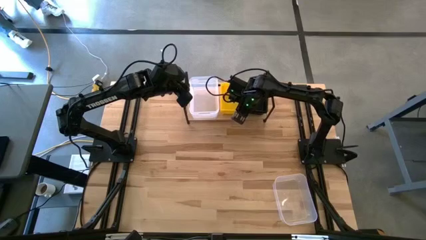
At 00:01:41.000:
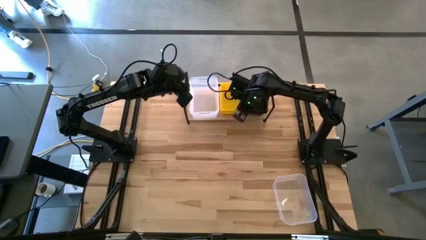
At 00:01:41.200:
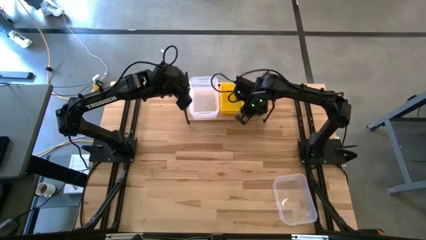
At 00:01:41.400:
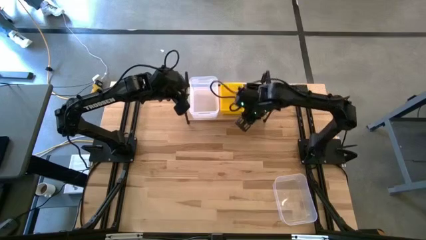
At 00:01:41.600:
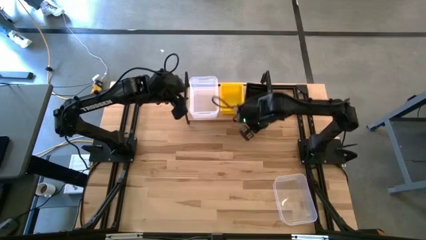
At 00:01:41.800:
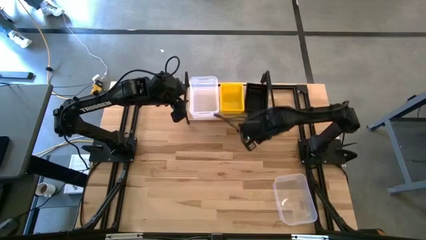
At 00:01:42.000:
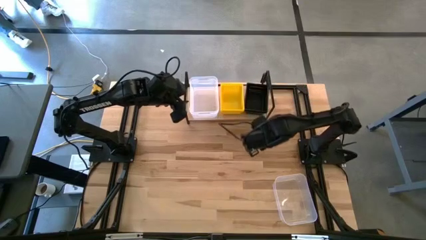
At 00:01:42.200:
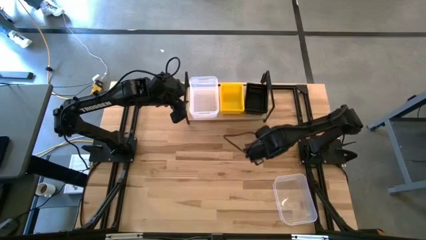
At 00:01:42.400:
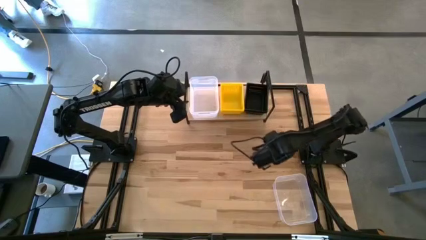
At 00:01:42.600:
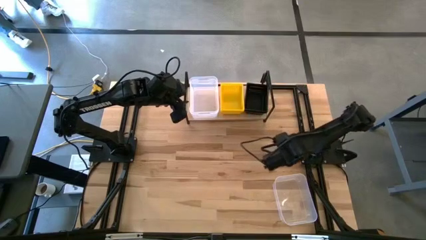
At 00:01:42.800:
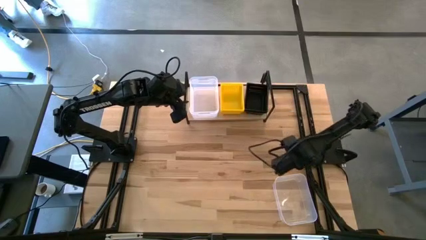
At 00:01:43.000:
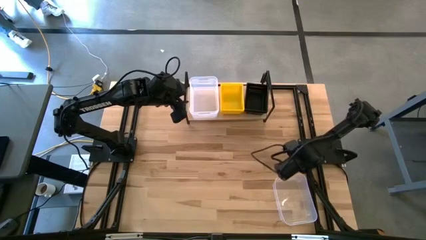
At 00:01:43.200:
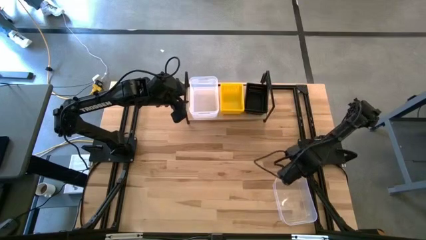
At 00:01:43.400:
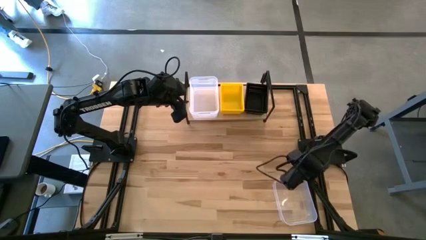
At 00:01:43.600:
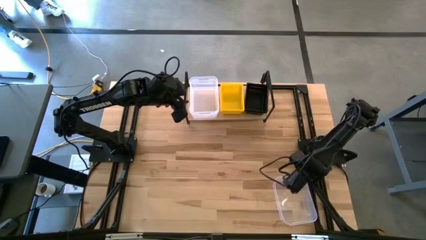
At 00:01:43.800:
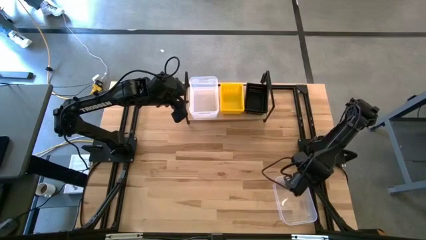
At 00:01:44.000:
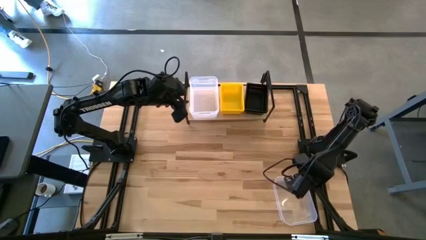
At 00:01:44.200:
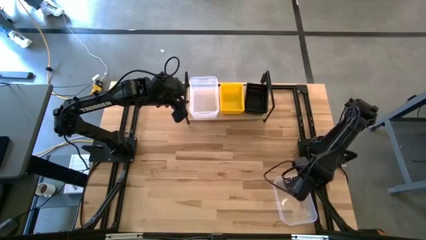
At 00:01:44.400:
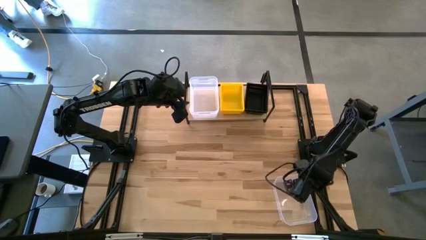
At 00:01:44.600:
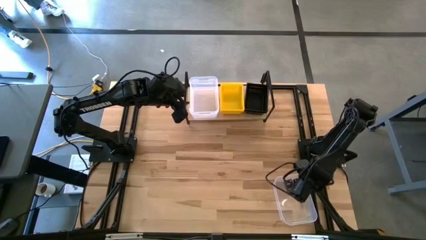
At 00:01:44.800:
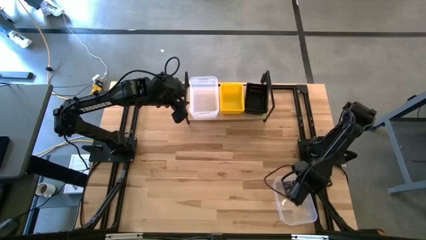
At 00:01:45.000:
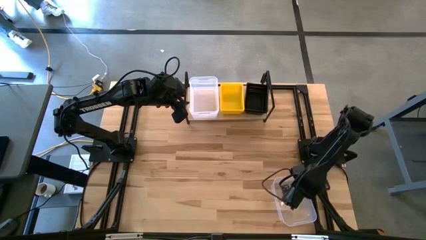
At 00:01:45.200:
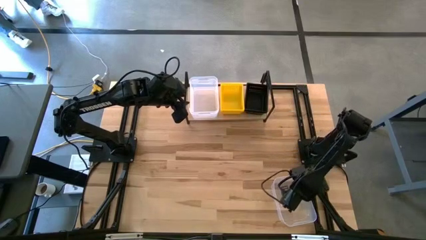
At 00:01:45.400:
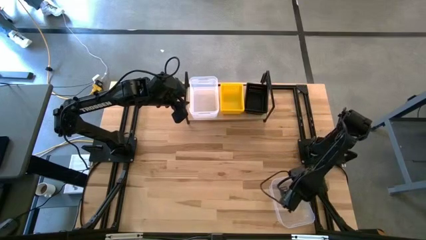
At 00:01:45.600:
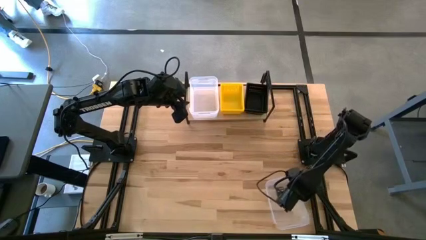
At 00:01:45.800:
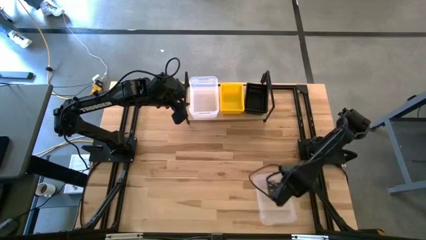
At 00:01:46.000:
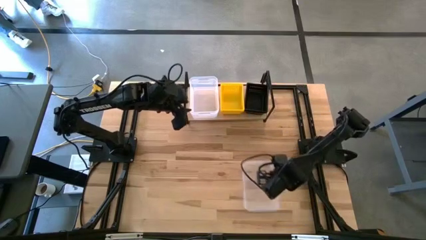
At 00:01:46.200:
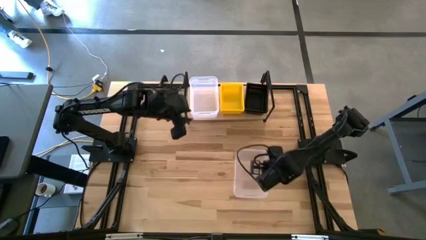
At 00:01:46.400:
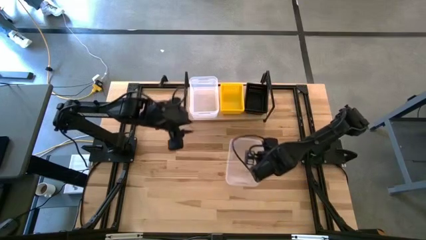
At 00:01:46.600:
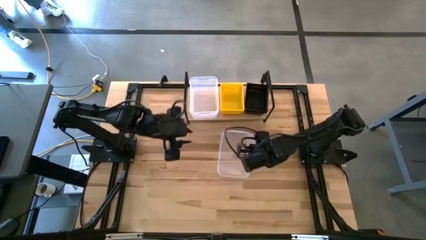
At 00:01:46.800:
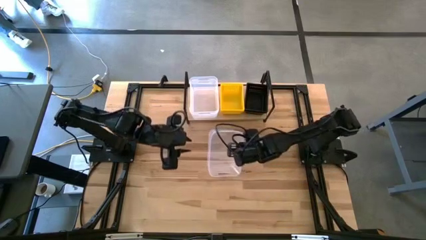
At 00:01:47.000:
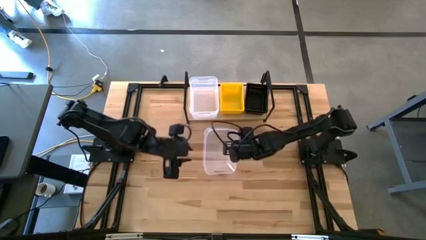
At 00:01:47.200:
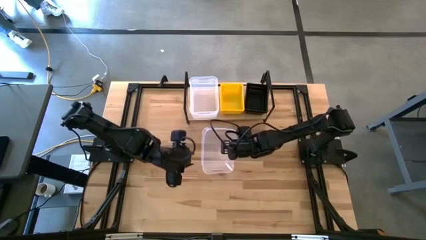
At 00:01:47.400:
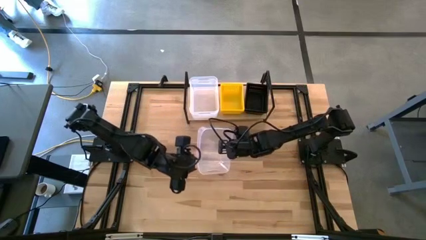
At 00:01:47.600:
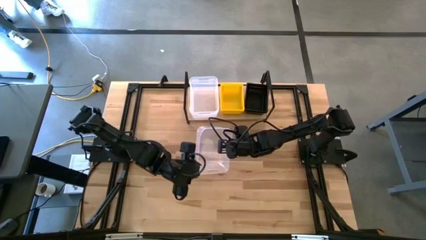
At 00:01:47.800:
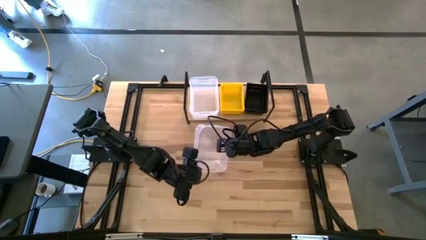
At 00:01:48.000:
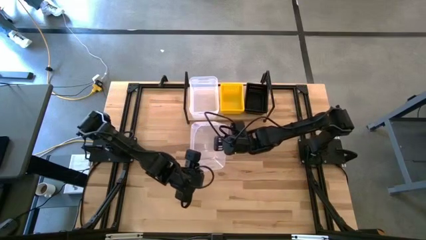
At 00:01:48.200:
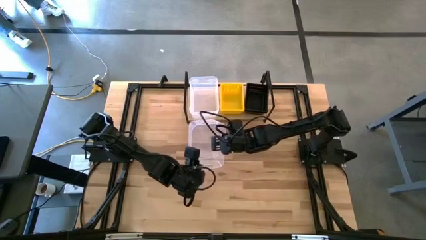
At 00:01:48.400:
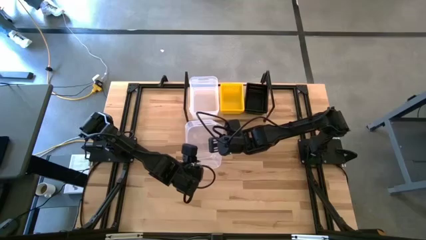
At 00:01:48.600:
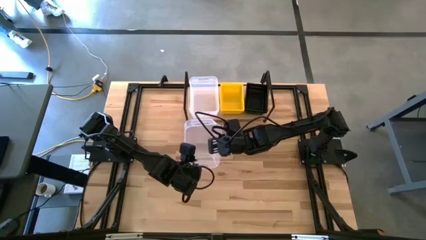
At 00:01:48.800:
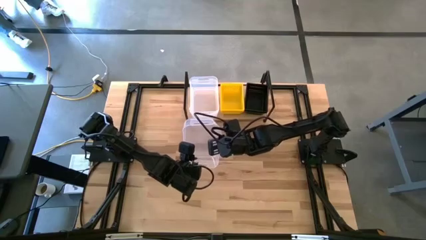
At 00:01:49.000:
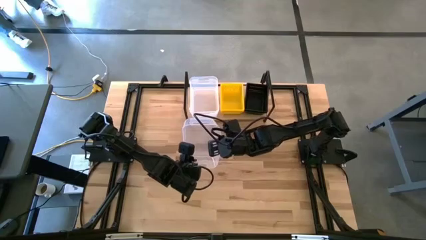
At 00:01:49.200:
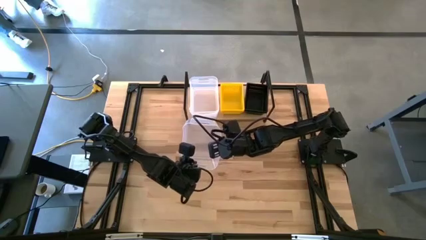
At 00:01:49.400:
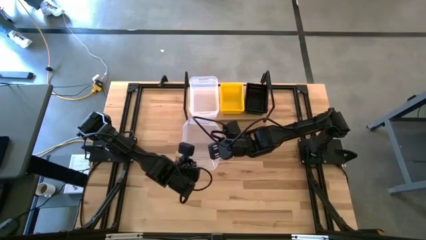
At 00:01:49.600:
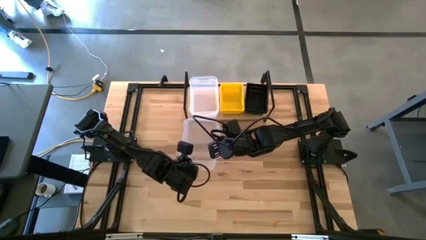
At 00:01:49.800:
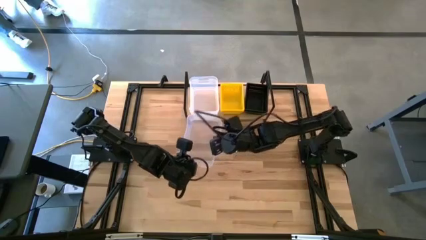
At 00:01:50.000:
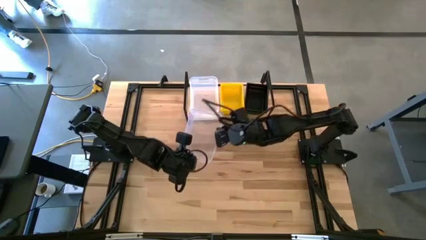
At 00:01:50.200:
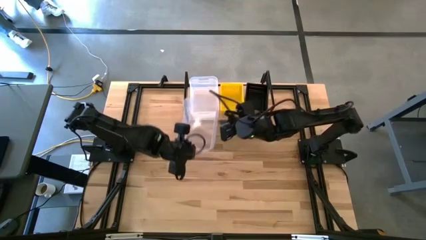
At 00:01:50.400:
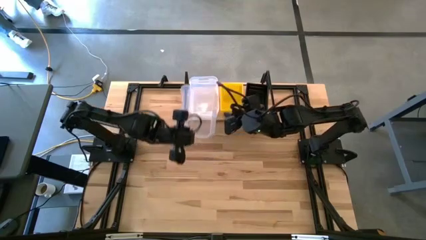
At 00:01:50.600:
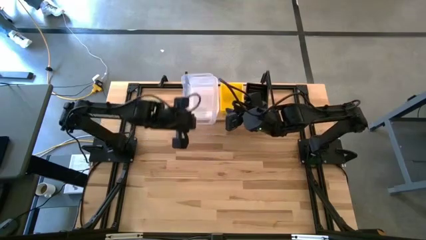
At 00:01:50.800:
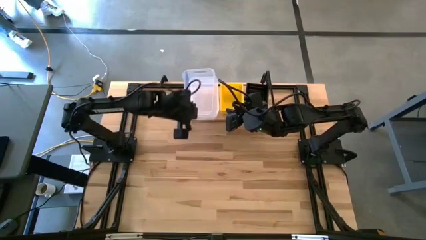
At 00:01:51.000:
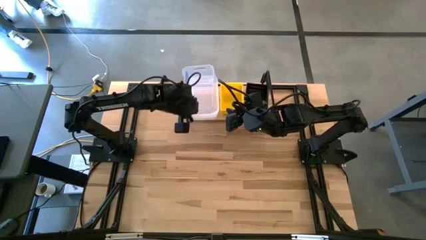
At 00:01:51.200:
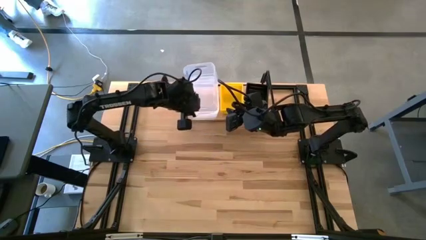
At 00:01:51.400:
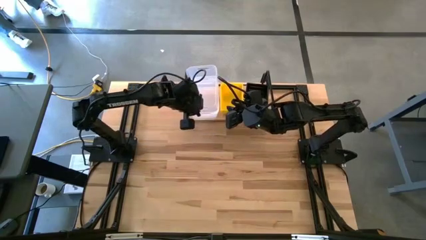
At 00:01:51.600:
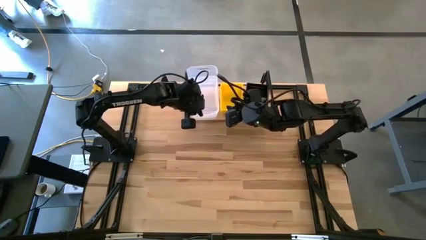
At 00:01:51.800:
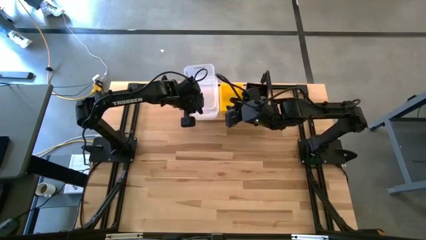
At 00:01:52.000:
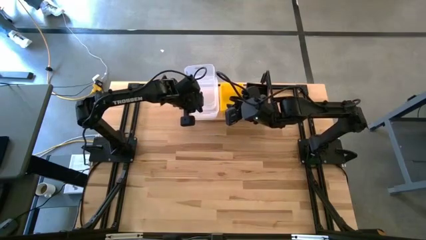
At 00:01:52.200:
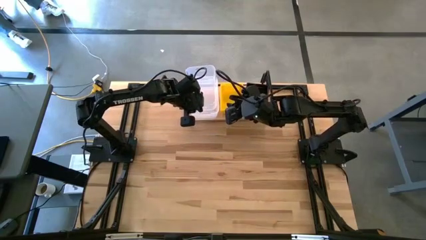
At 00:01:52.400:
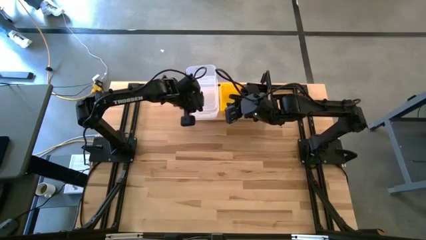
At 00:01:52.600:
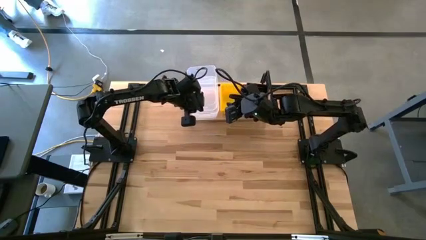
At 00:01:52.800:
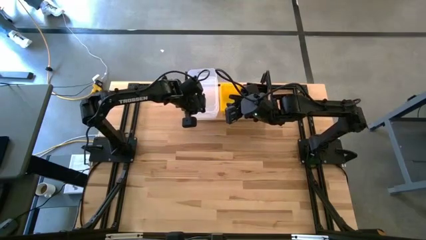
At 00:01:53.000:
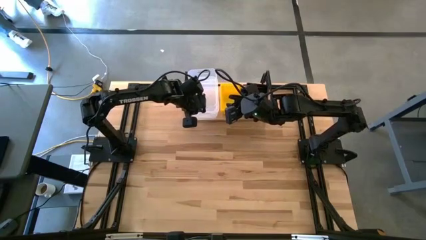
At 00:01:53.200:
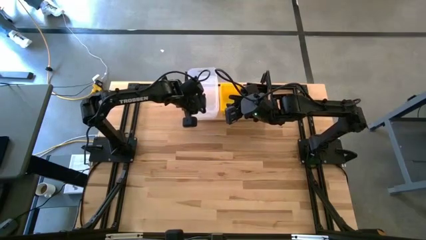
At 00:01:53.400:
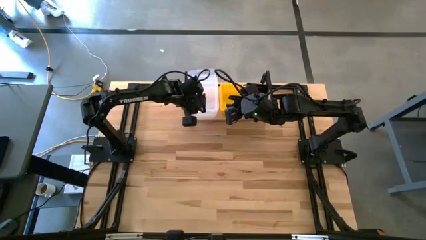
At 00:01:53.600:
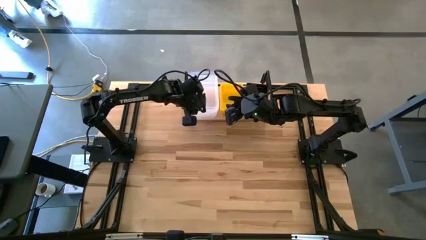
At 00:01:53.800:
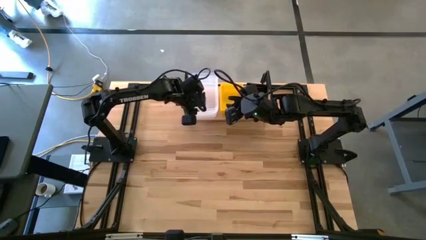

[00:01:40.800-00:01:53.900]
Task: Stack baskets on shelf by color
Stack the transparent bin on the transparent bin on the shelf

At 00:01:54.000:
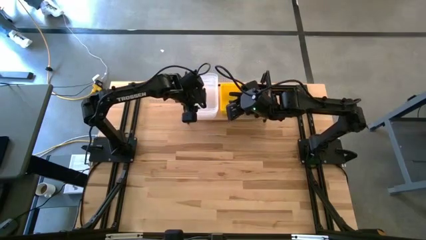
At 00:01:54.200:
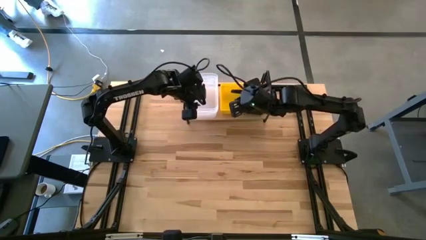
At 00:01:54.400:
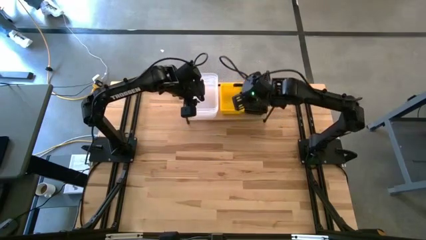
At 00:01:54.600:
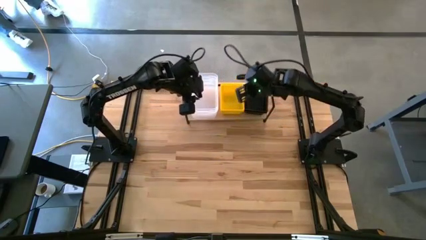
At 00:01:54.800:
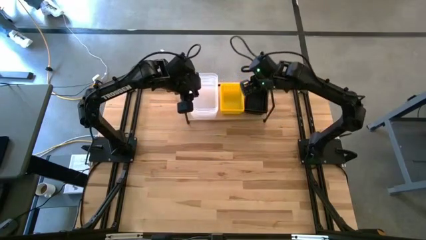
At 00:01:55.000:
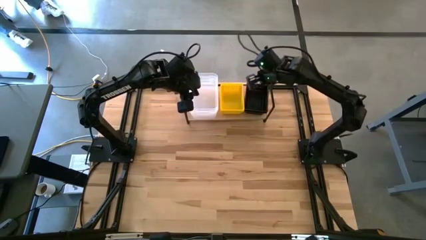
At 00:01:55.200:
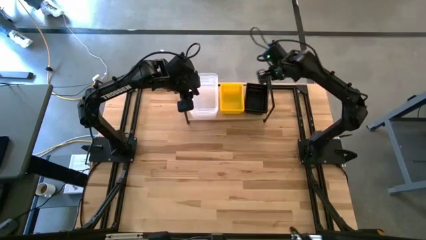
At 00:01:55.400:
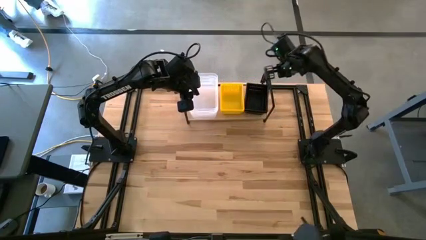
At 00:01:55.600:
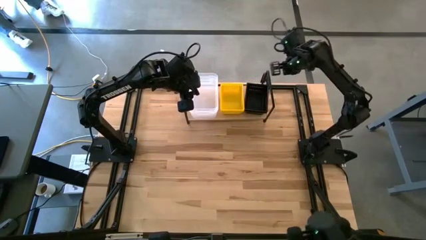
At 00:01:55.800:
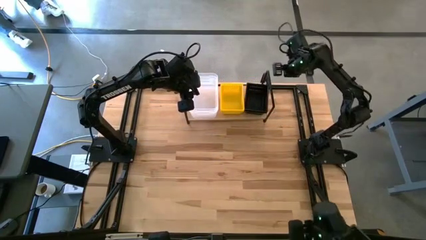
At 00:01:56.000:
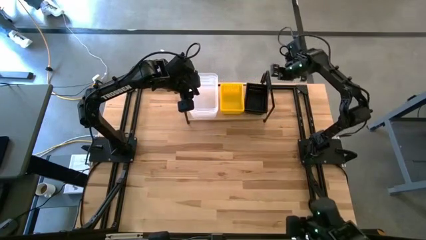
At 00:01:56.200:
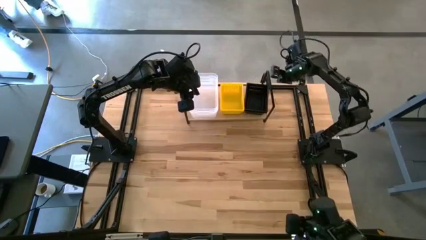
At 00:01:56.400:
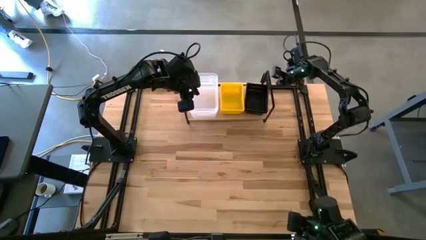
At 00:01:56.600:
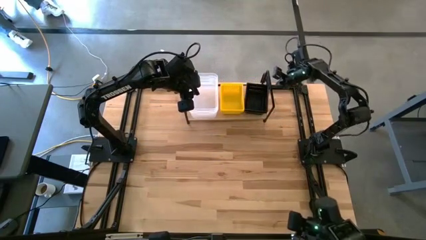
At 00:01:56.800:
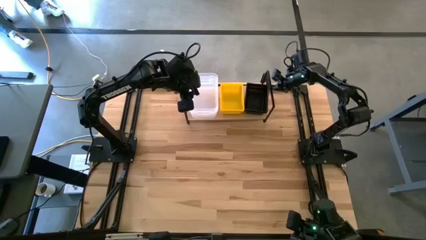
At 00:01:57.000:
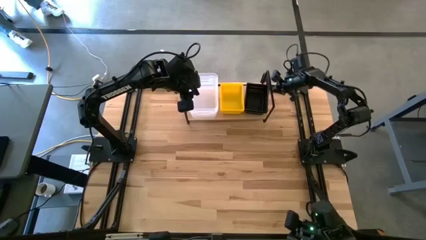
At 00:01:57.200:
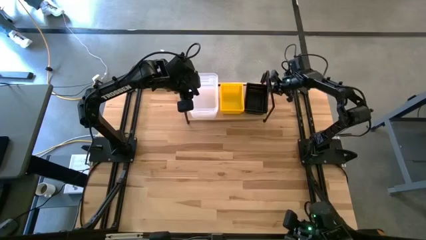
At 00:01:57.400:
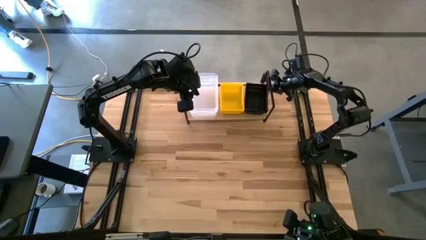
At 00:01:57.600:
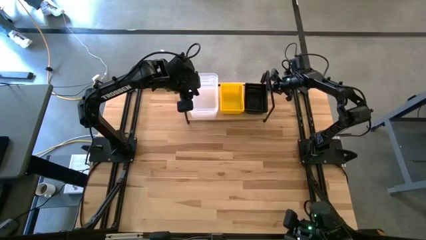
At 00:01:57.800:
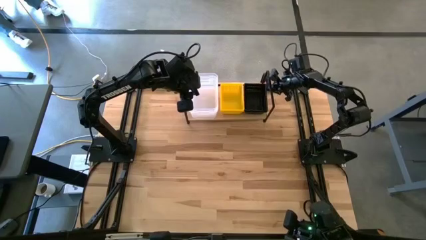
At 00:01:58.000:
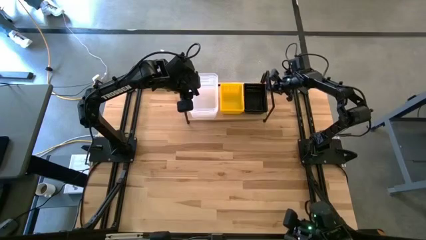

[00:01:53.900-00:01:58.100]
Adjust the black bins on the shelf
